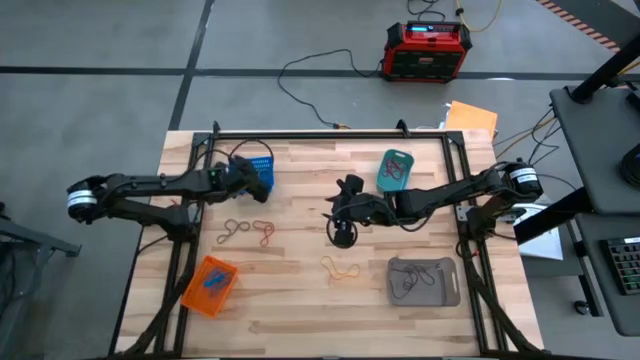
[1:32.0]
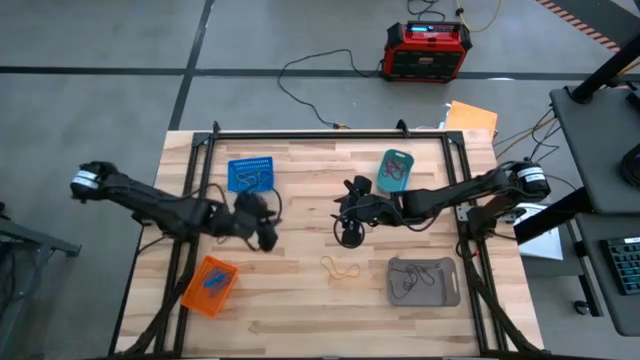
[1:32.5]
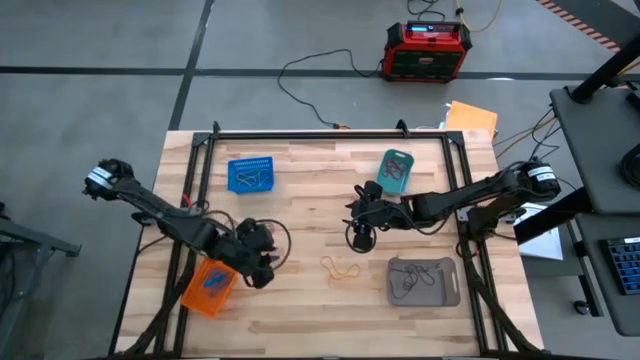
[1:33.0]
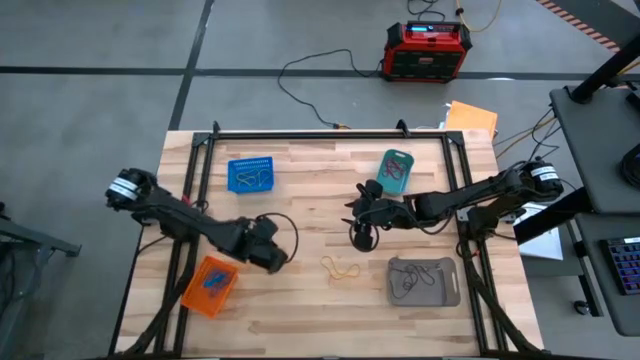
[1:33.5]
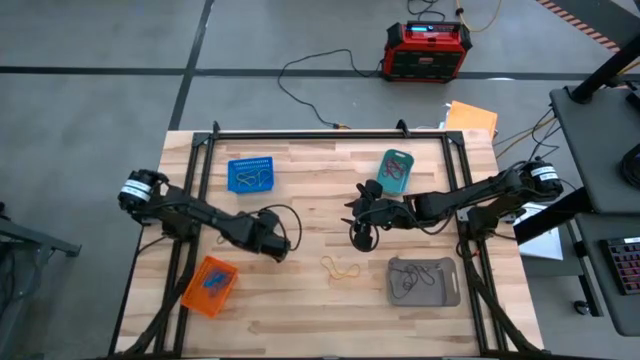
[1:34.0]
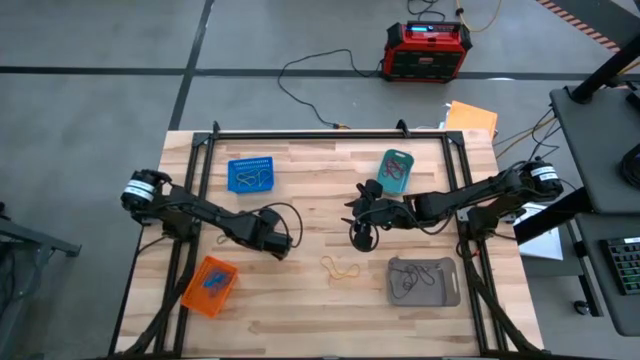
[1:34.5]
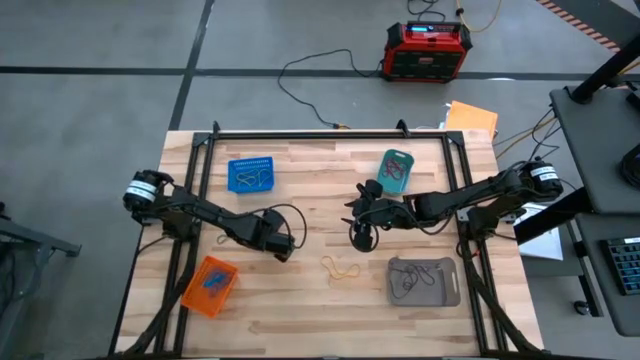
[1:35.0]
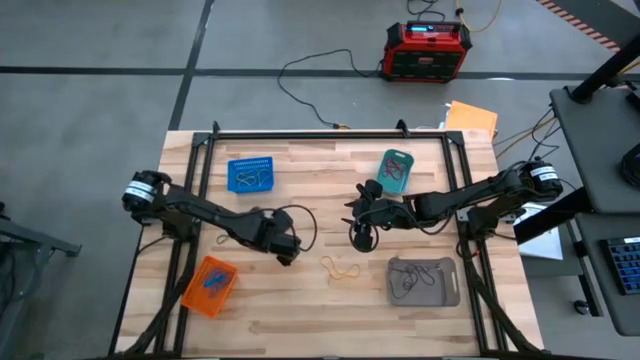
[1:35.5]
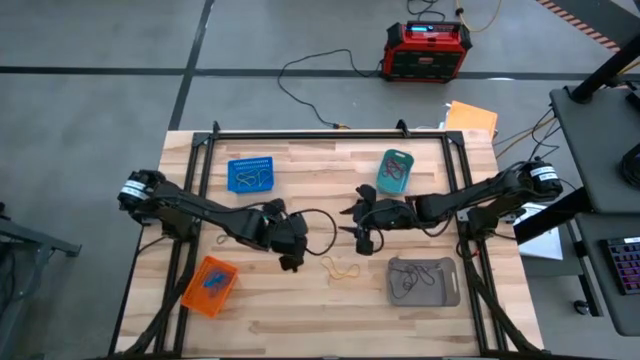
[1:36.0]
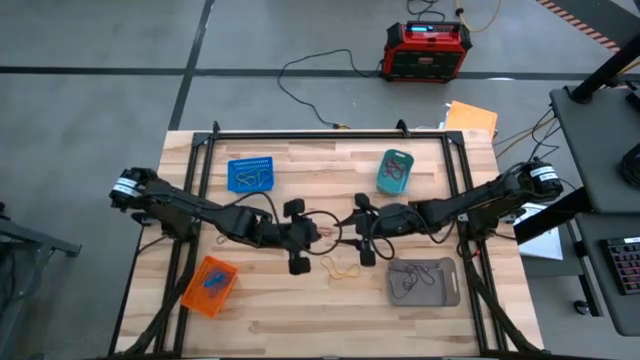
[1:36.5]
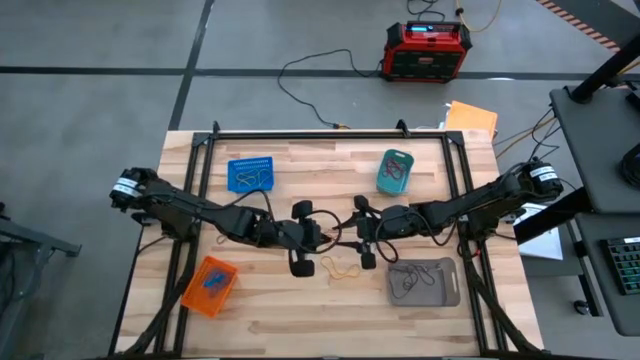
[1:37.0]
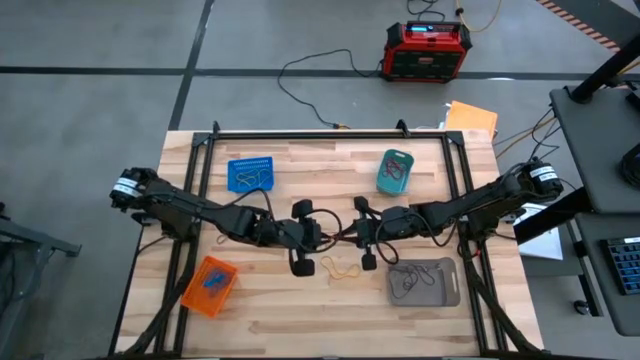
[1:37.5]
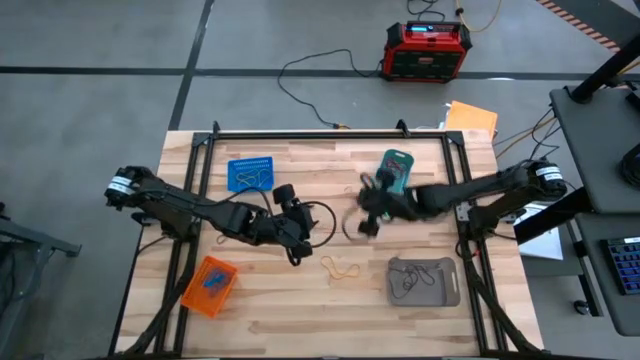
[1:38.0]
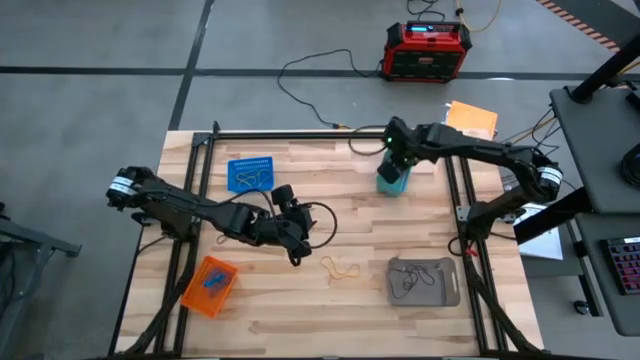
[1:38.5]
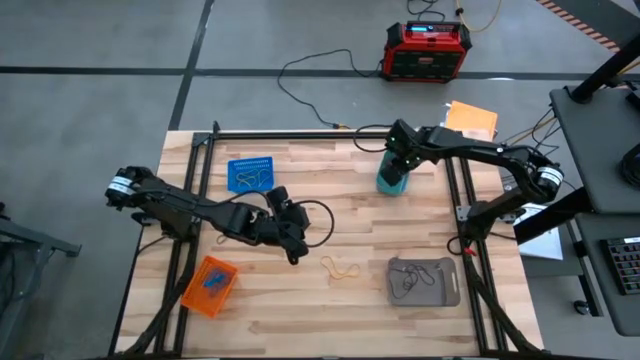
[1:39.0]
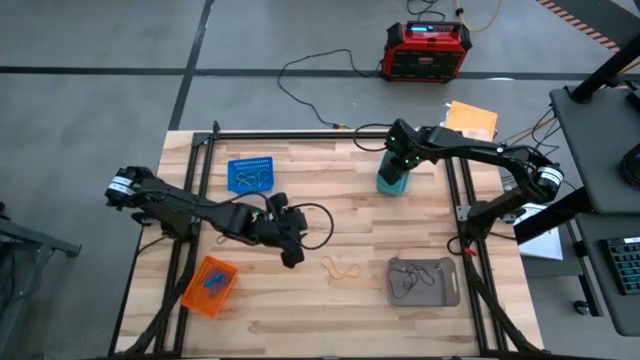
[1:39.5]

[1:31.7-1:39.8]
Task: Sort rubber bands into baskets
Put the orange rubber band into right blue bin

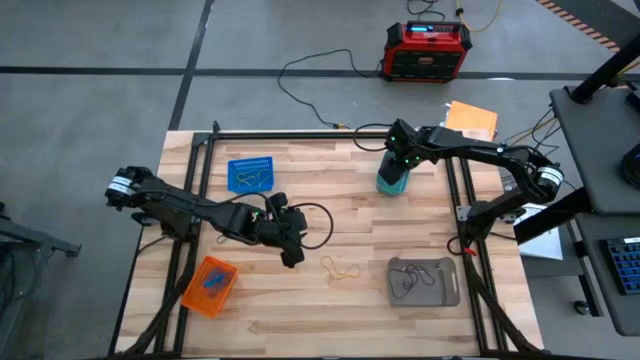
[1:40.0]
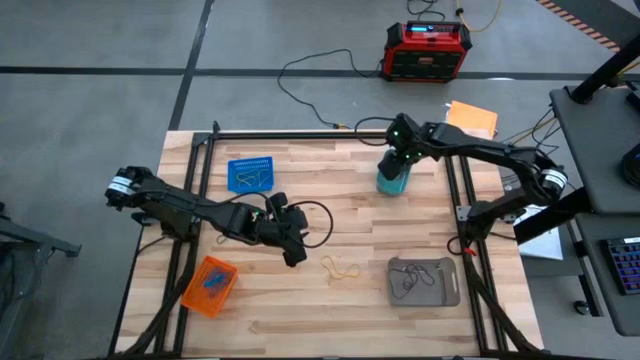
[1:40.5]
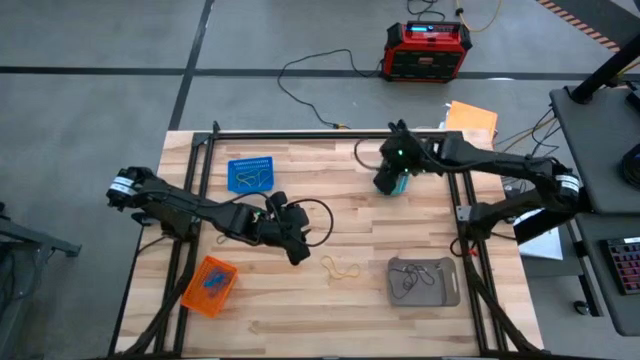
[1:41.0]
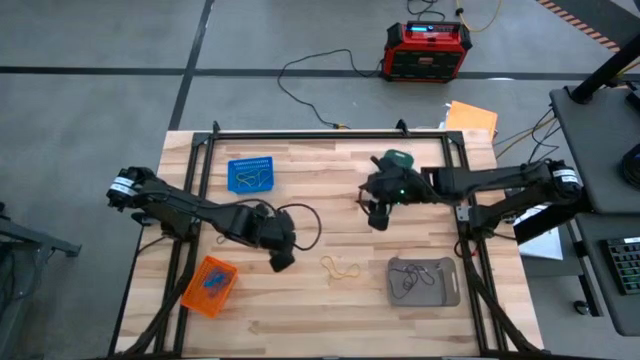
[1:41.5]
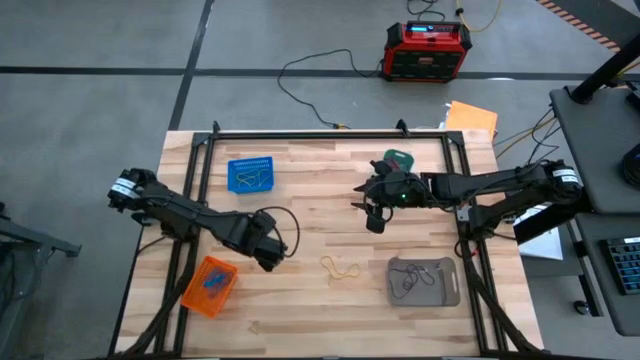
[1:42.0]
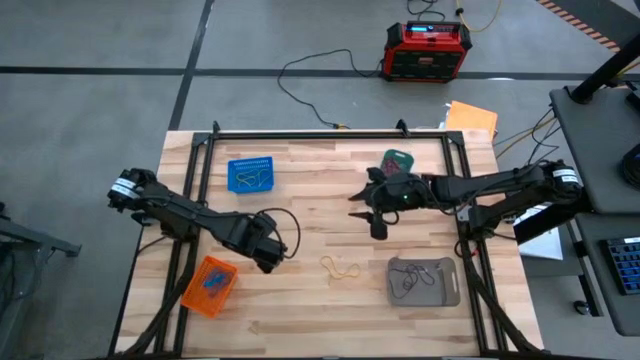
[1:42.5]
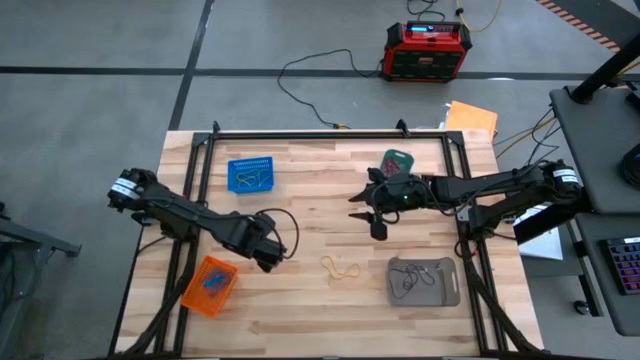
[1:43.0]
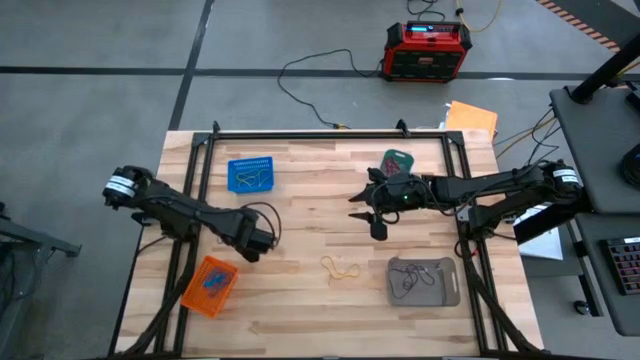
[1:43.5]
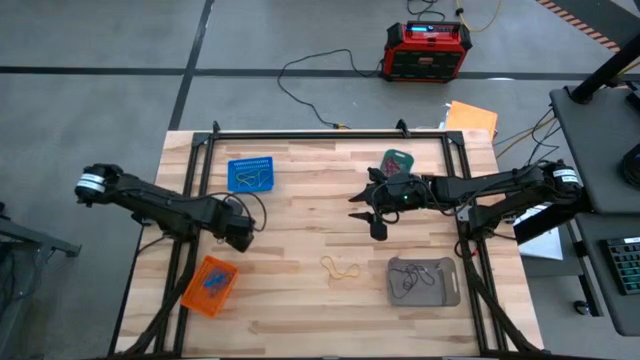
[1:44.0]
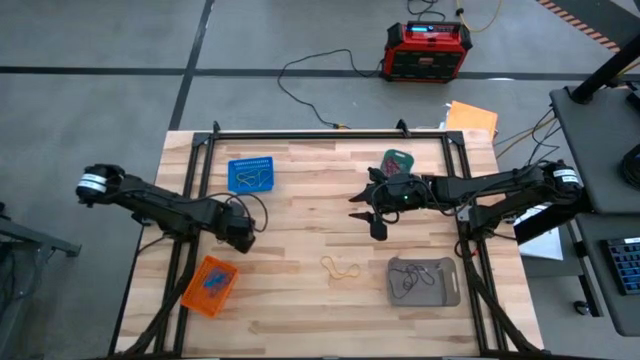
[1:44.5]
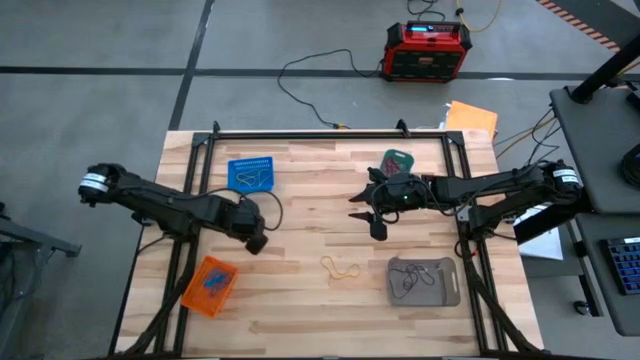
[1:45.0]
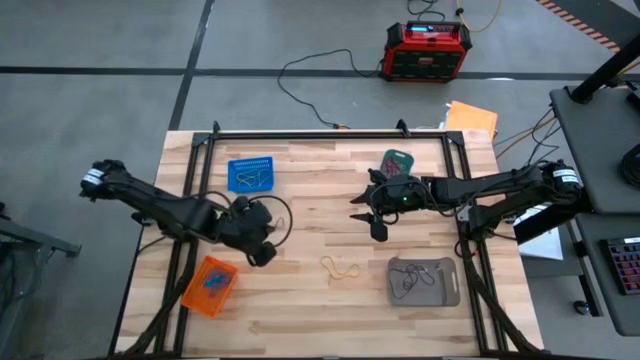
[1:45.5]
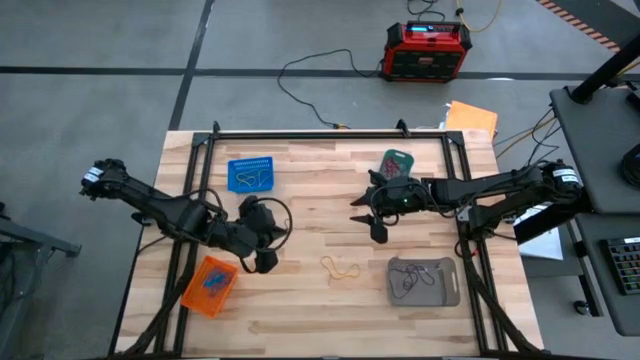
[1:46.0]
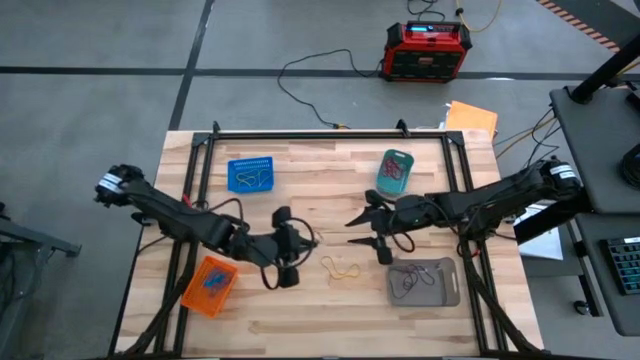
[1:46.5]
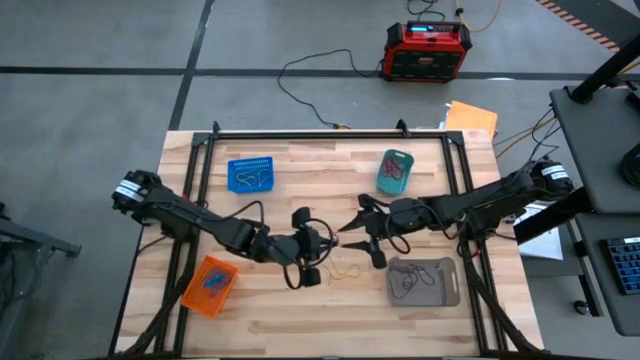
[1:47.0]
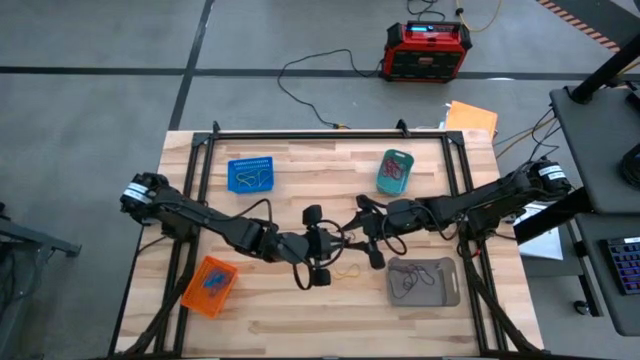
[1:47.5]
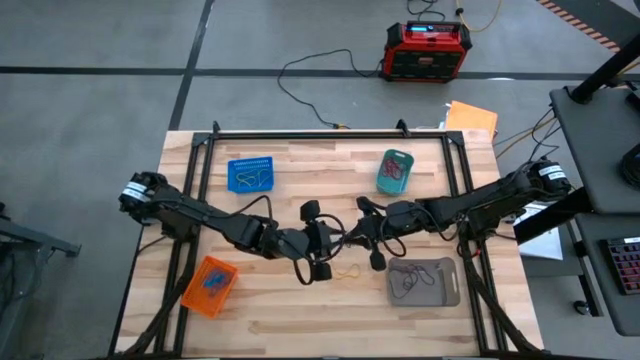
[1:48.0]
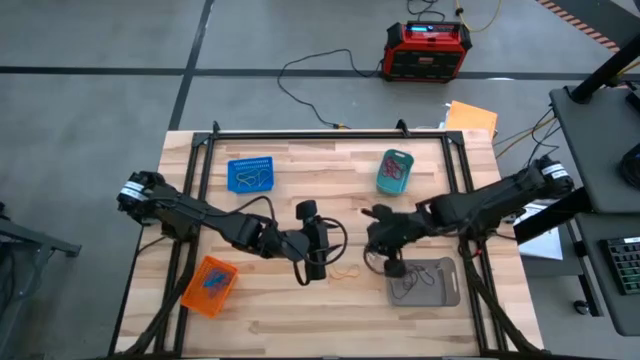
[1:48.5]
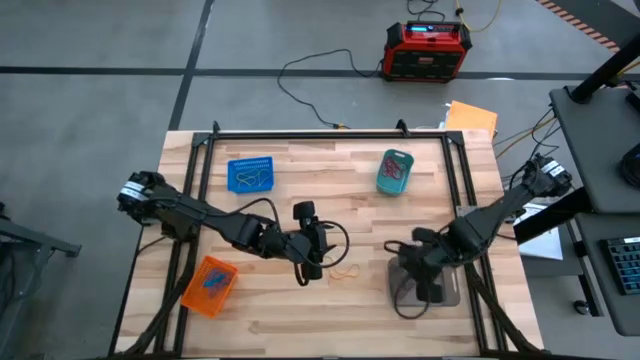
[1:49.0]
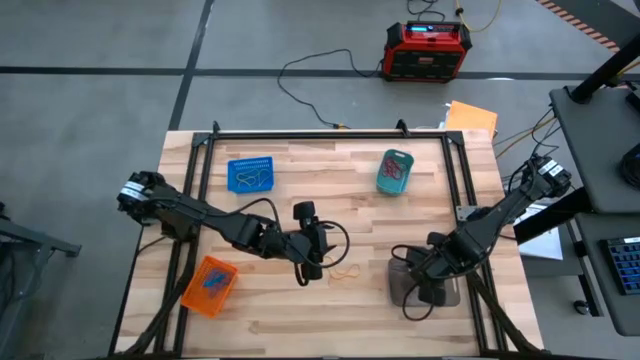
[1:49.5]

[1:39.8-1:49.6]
Put the violet rubber band into the black bin

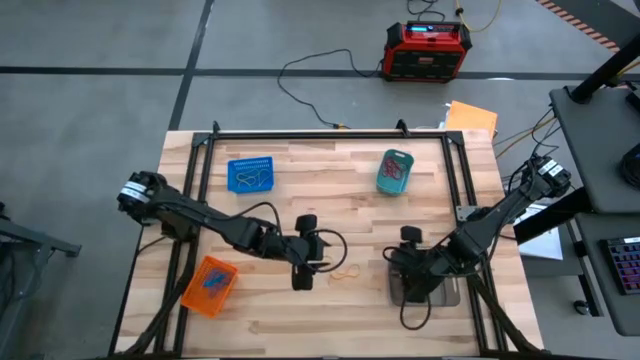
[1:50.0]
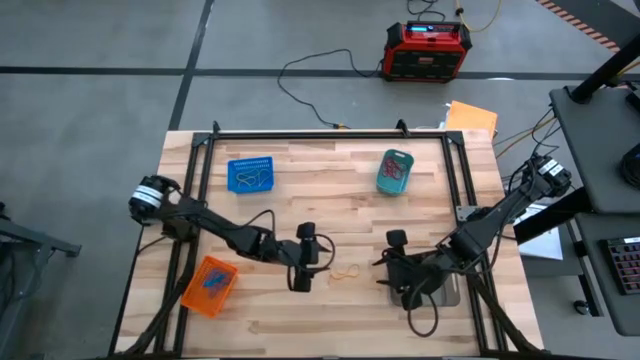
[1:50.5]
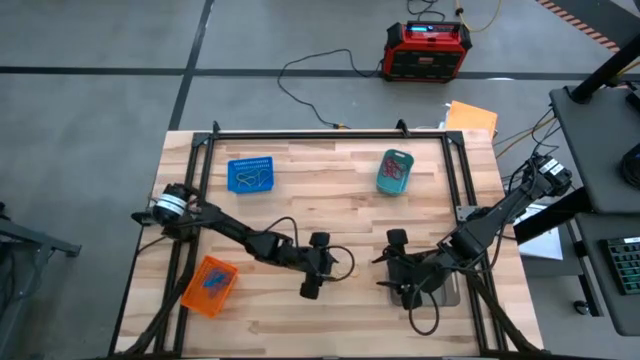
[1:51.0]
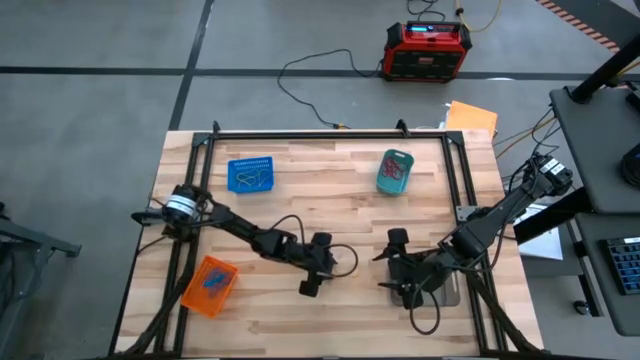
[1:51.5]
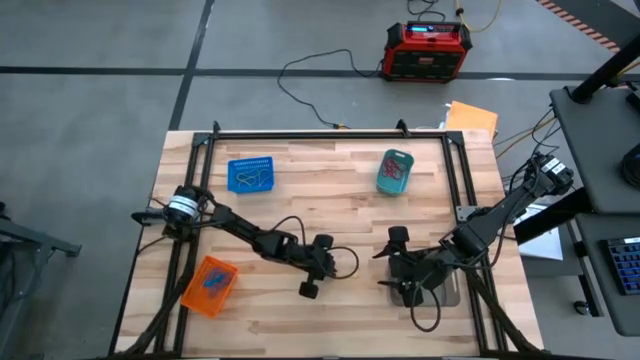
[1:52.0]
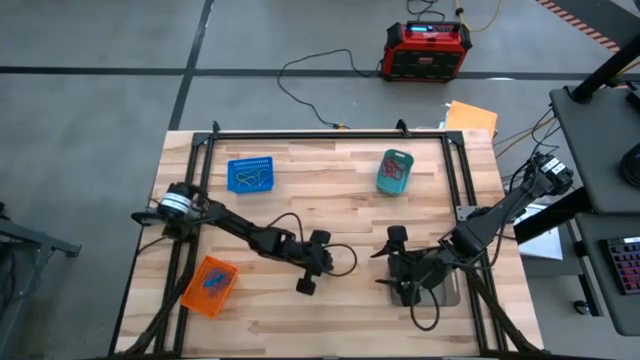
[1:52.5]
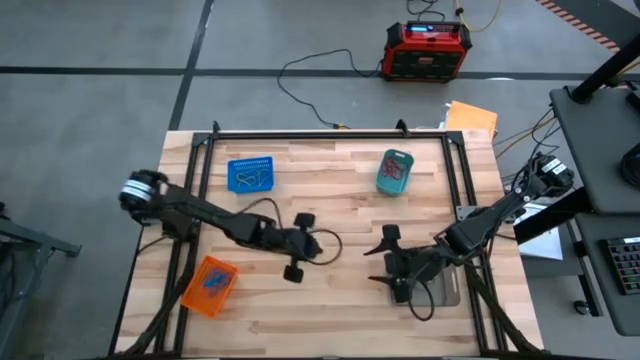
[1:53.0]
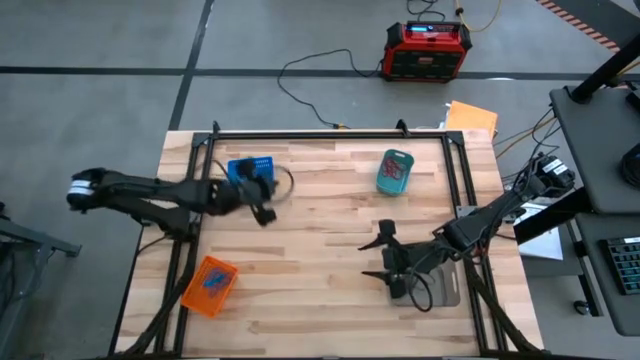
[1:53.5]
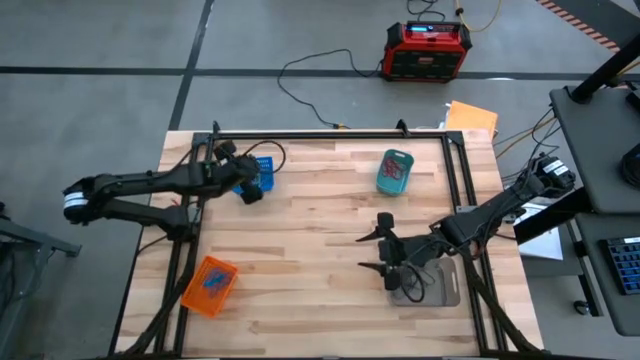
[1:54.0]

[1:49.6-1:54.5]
Put the yellow rubber band into the left blue bin
